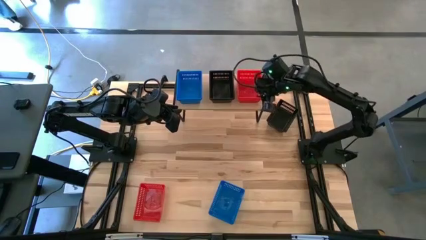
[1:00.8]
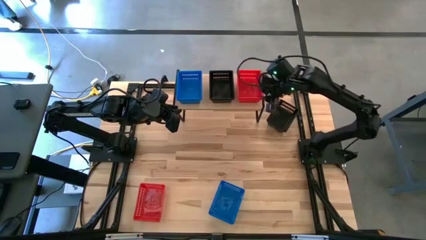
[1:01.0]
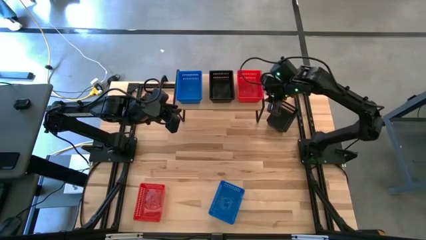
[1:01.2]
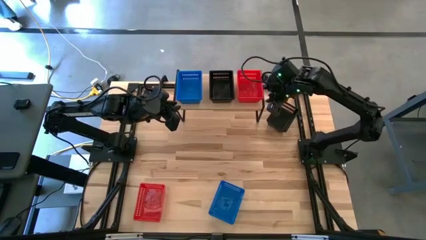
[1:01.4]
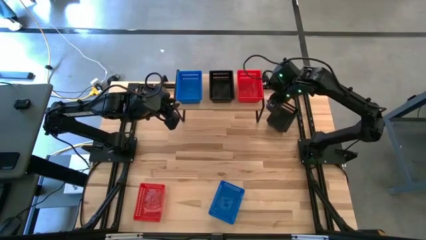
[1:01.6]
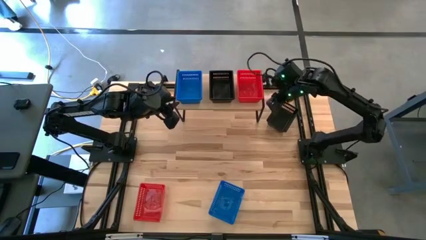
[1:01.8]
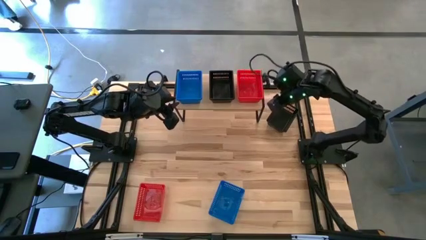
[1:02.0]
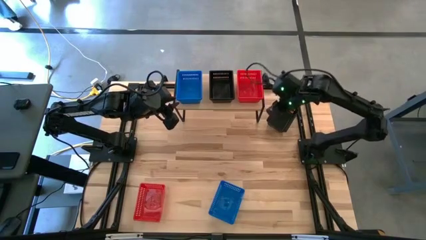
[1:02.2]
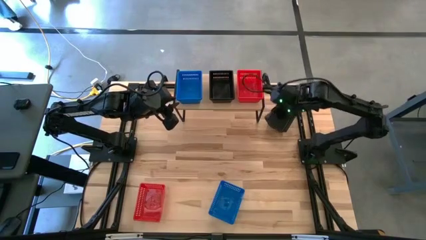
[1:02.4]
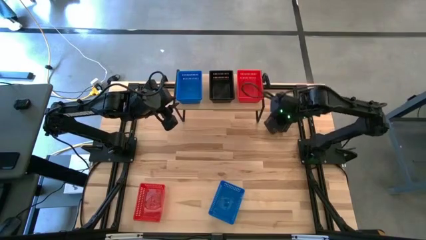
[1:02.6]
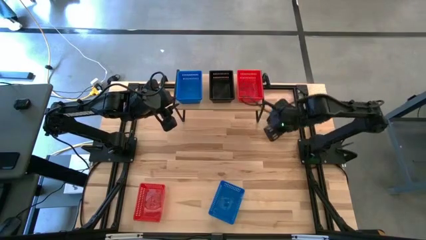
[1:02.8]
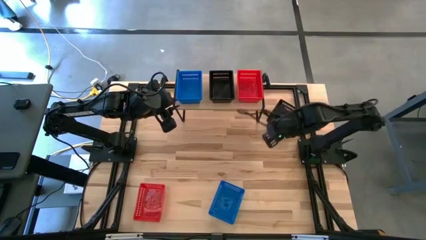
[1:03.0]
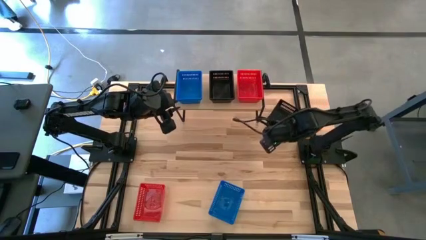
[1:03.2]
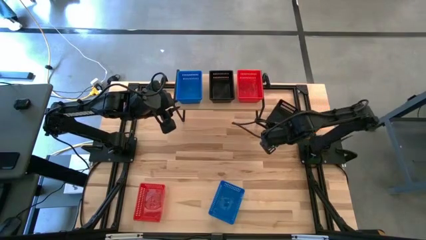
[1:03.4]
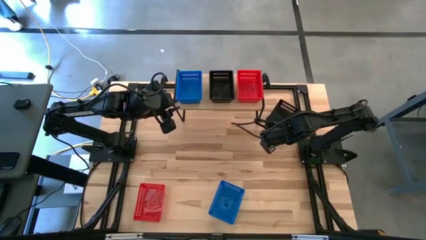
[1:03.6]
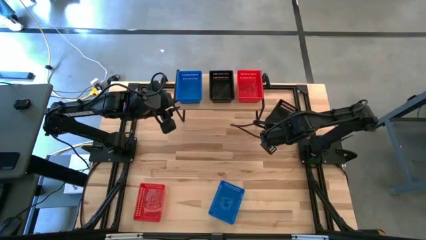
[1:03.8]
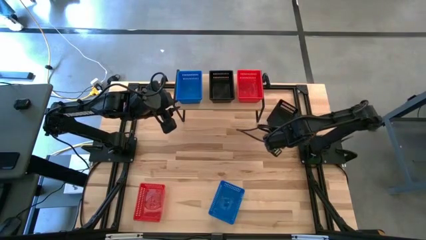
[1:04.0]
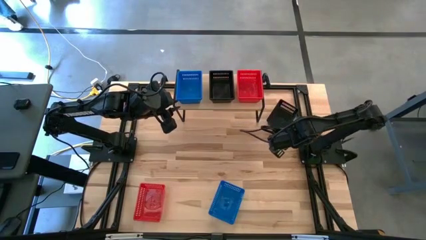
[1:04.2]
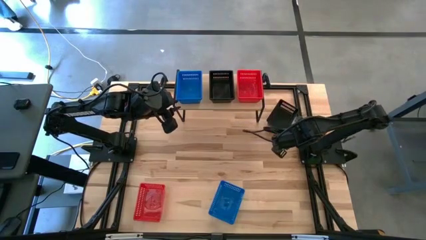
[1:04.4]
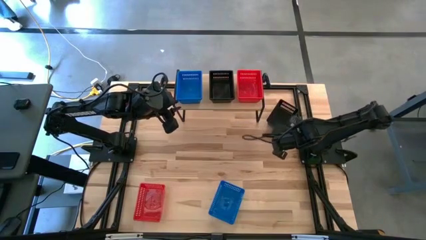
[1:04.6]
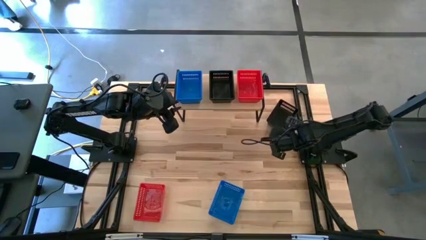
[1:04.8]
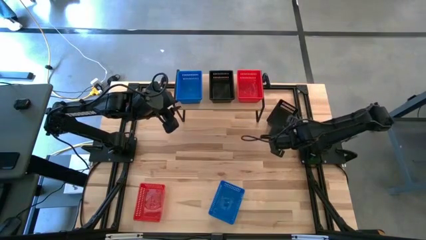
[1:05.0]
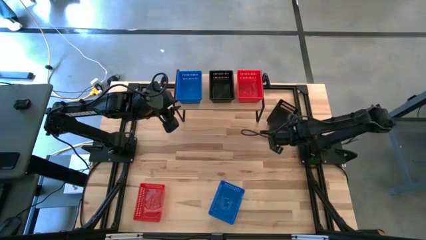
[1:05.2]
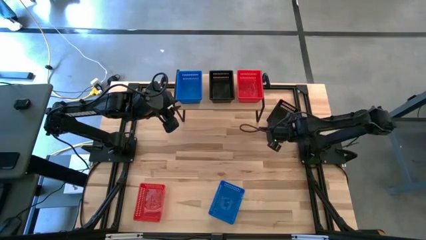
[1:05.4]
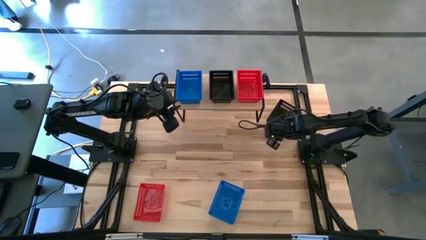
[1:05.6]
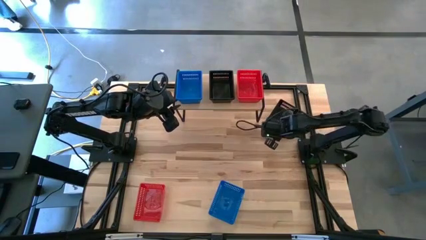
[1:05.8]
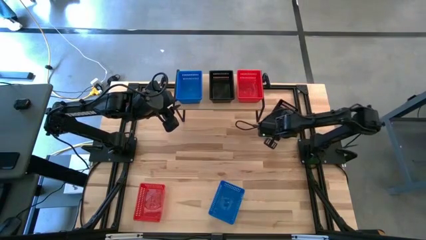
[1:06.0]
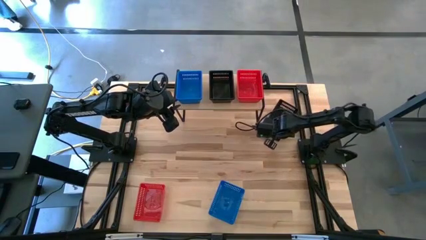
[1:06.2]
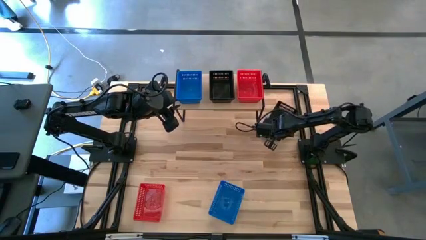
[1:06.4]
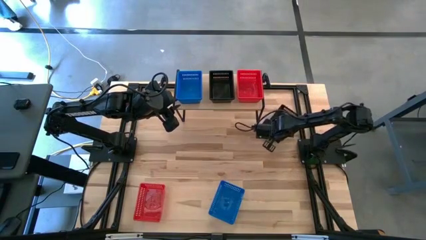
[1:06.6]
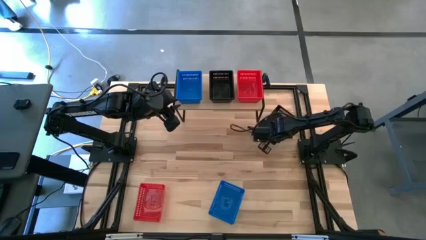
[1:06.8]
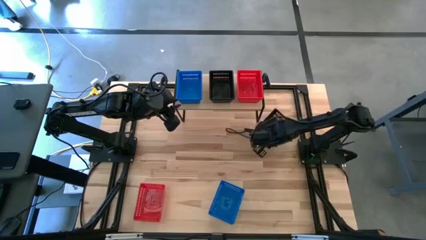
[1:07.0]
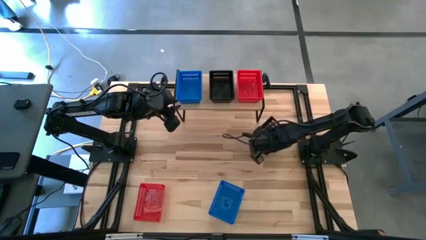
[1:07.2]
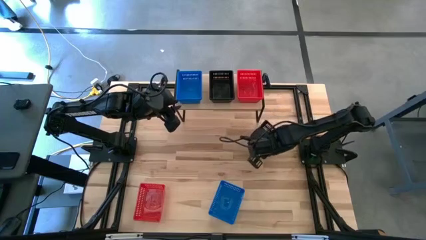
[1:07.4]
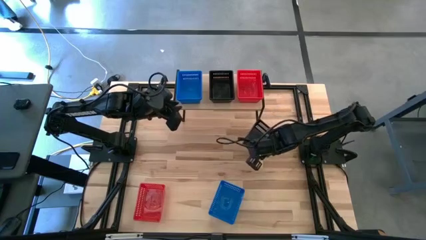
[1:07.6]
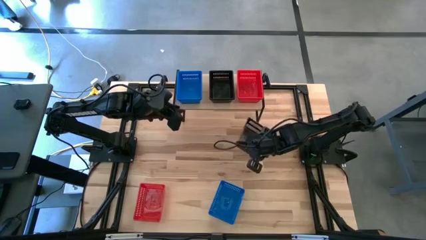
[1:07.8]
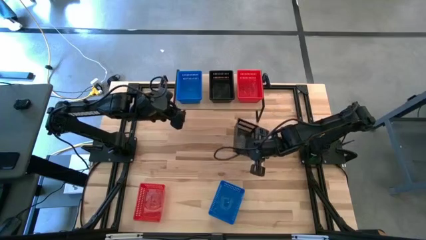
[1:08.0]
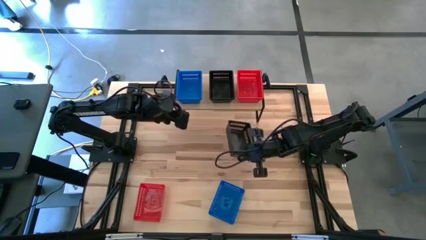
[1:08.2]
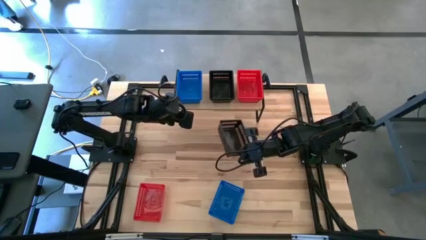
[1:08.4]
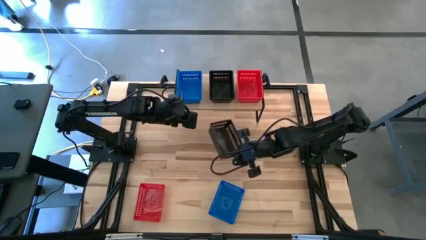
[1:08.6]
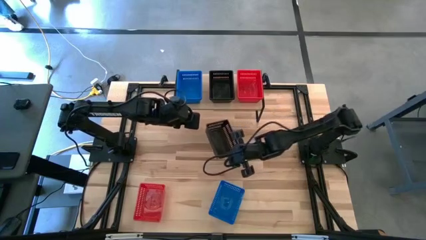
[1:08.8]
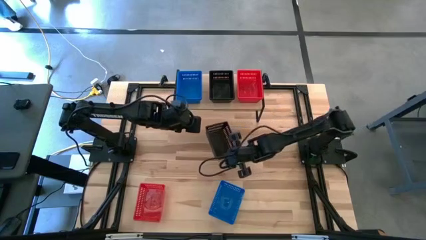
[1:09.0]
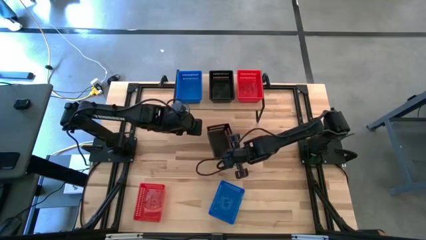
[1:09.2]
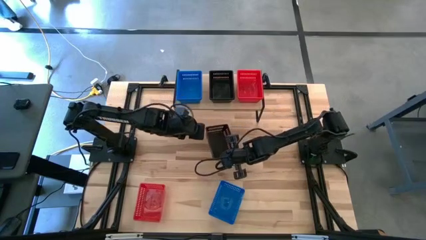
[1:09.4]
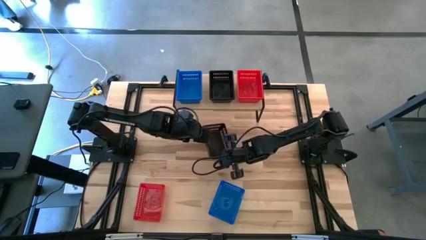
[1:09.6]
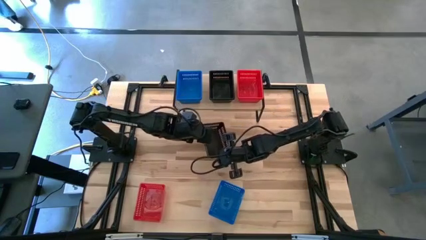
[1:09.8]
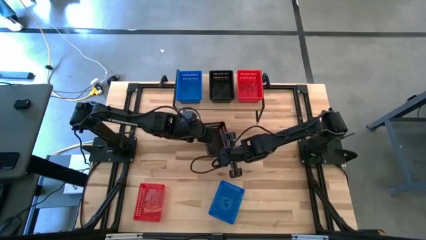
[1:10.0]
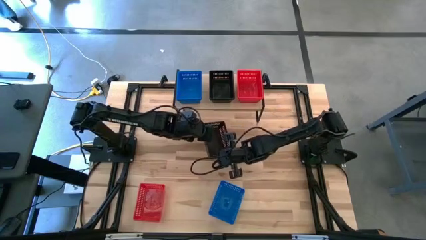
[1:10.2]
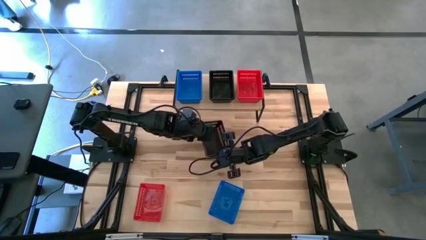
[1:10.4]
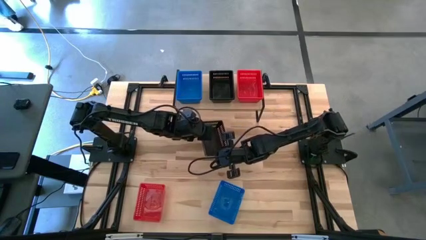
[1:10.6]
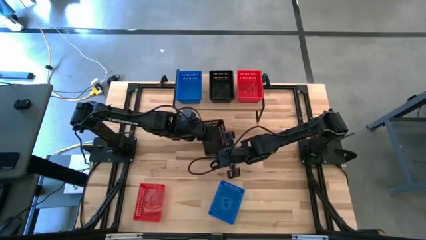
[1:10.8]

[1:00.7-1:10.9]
Task: Stack baskets on shelf by color
Stack the black bin on top of the other black bins on the shelf

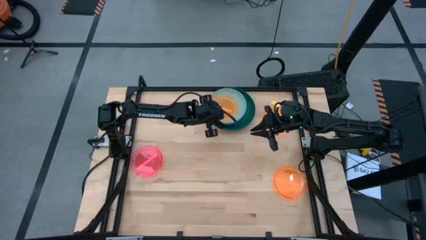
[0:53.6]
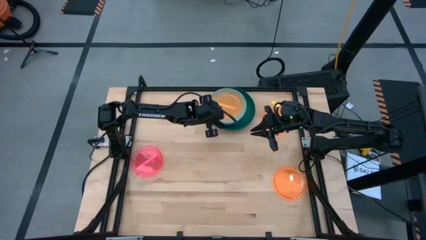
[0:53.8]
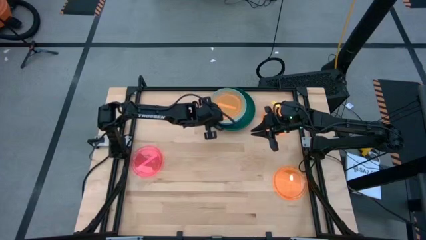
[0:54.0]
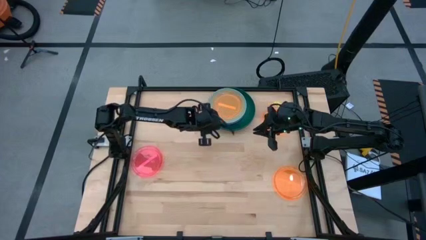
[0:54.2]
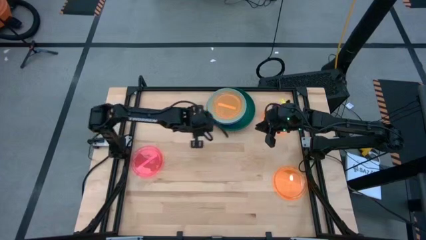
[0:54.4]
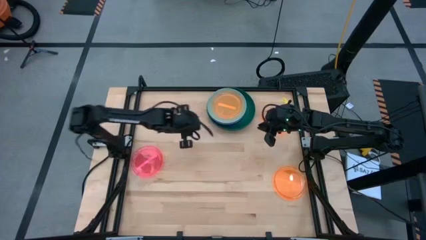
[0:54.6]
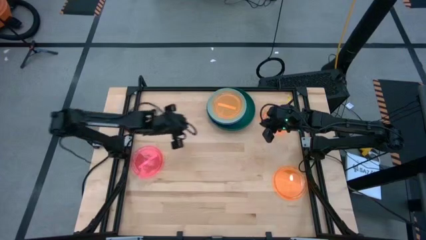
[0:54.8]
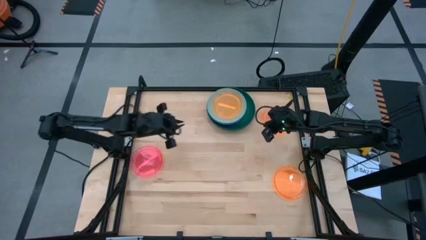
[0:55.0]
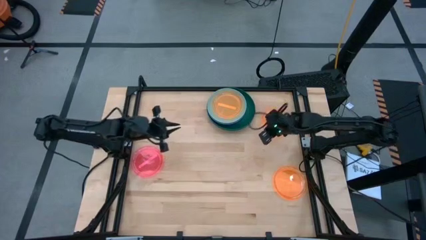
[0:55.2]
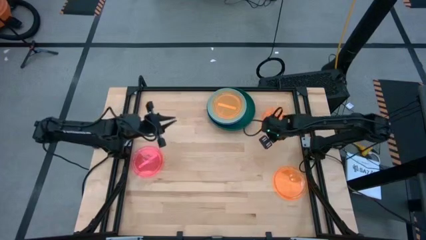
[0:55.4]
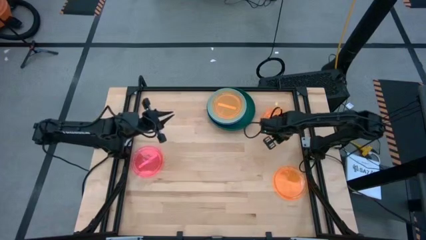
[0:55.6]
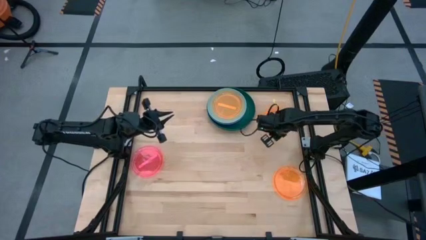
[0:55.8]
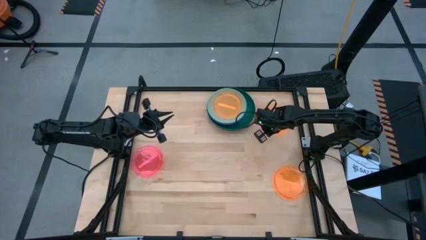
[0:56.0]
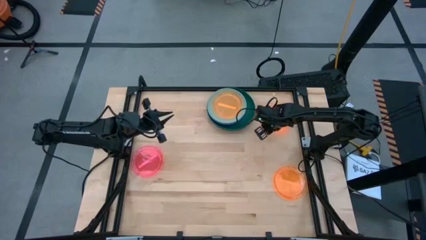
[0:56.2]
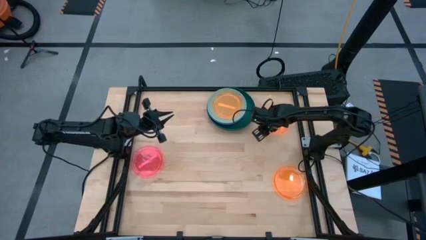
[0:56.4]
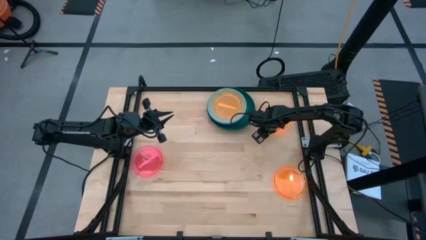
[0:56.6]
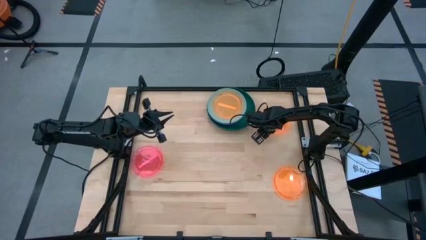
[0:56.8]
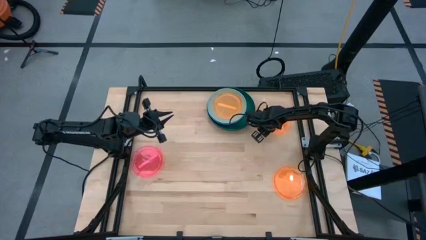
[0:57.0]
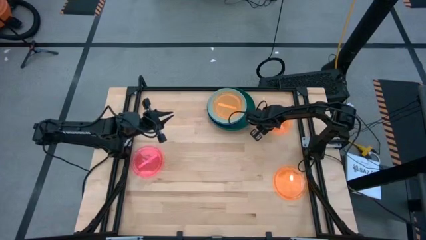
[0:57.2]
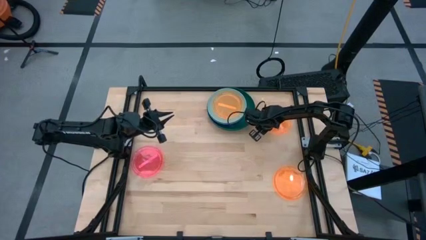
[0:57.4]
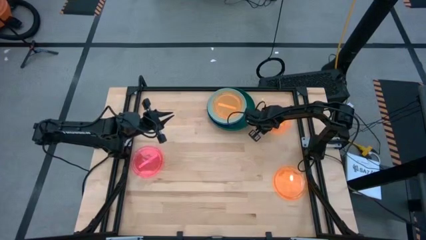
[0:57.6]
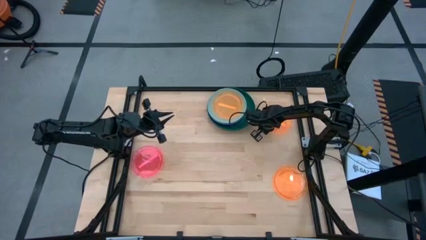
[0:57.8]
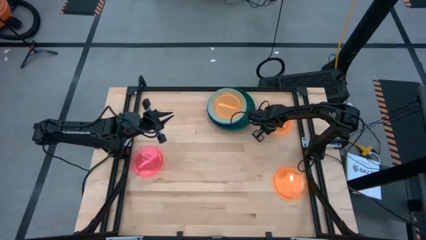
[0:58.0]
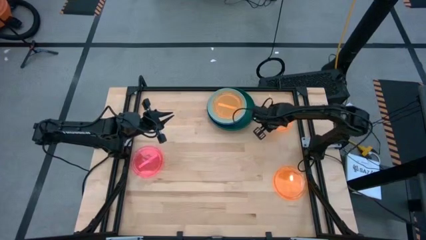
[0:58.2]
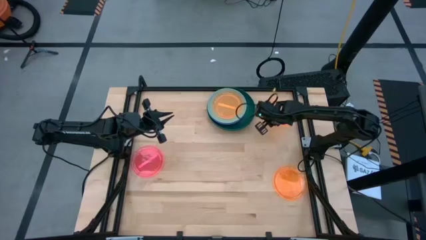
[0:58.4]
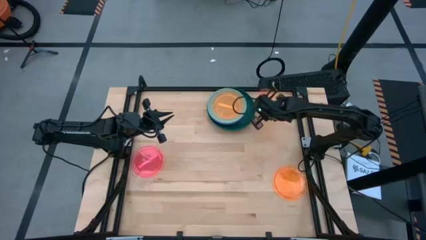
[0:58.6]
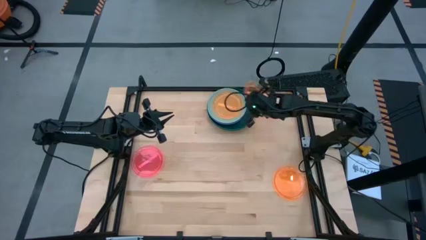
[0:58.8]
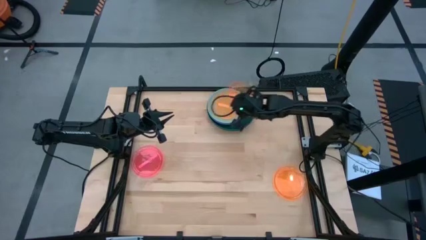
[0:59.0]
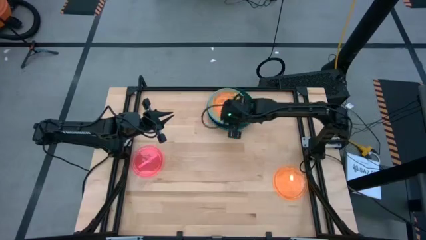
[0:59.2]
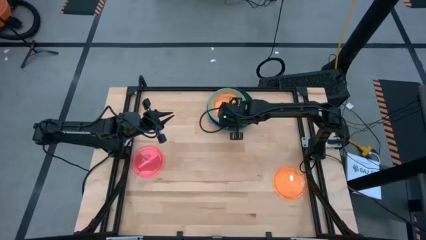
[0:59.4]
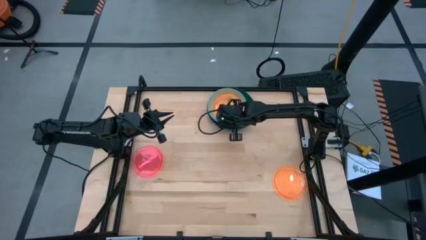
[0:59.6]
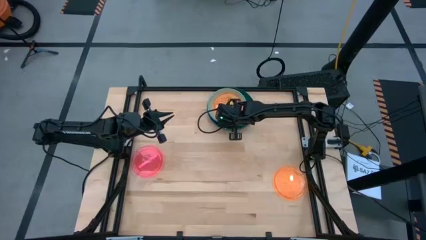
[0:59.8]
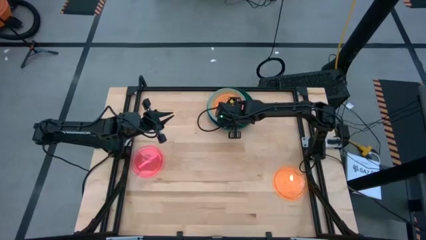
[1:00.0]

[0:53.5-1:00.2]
Task: Stack plastic plates
Stack the top orange plate on the top left orange plate

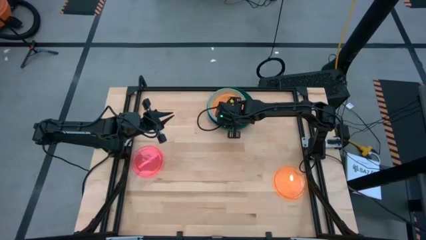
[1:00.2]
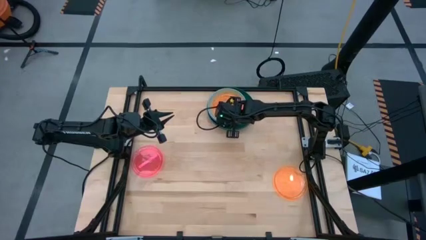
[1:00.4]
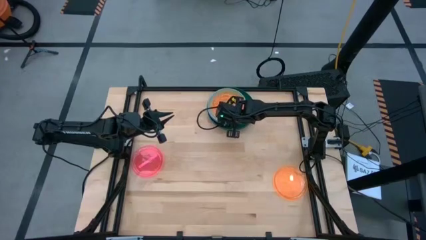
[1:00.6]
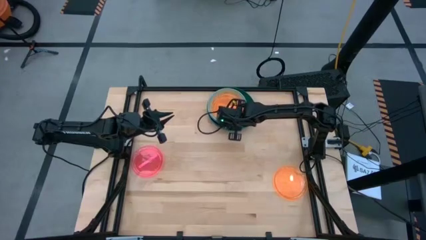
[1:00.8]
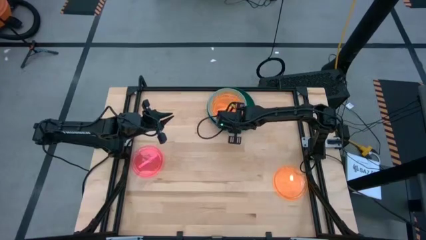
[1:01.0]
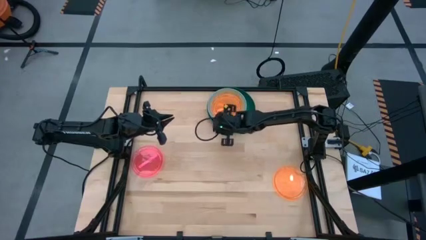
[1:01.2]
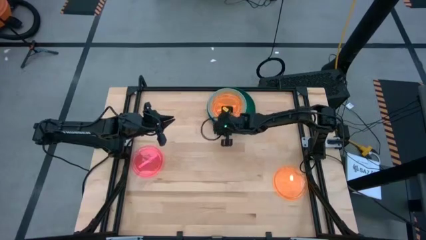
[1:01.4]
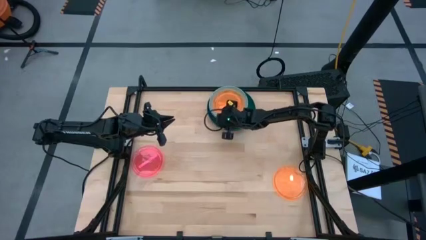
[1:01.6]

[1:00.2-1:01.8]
Adjust the stacked plates
